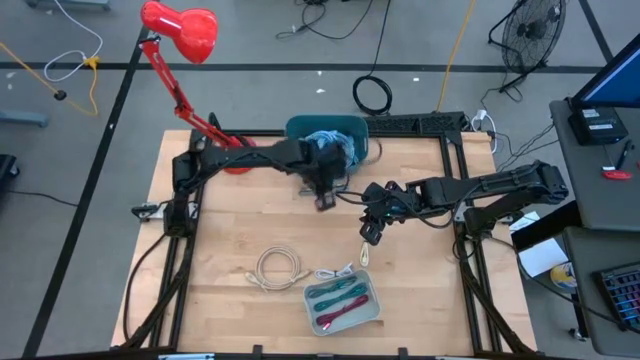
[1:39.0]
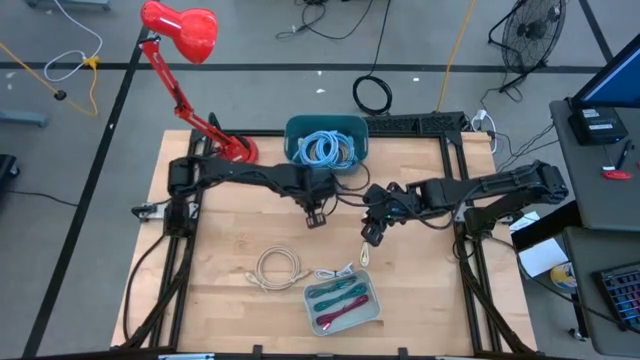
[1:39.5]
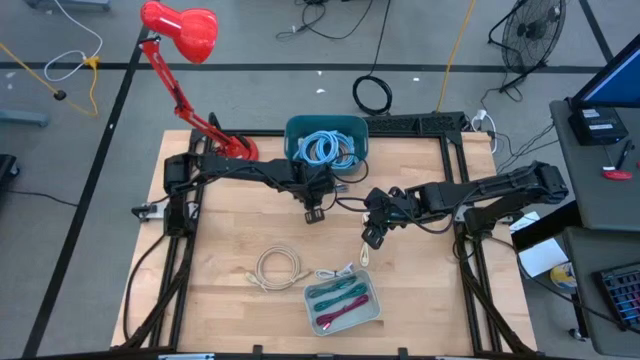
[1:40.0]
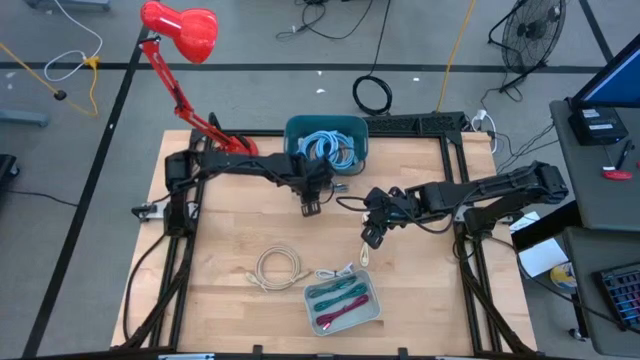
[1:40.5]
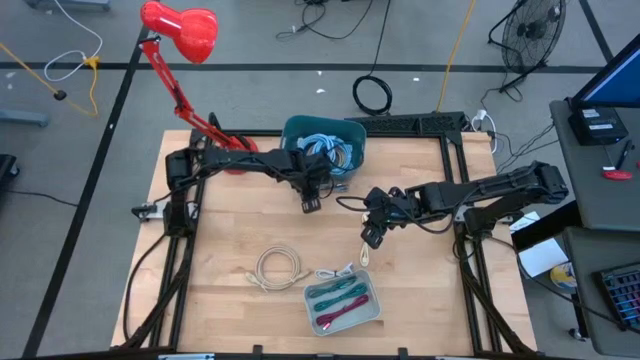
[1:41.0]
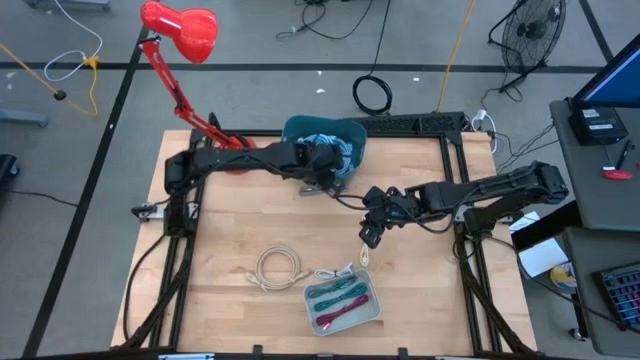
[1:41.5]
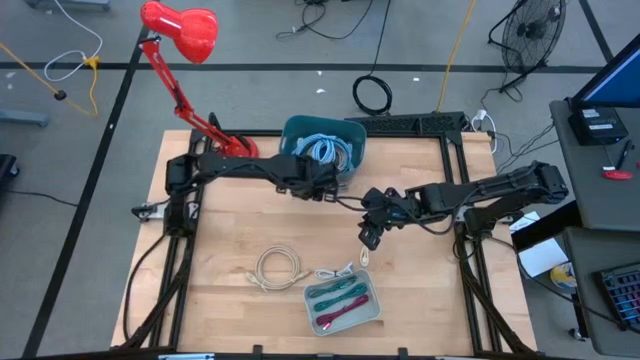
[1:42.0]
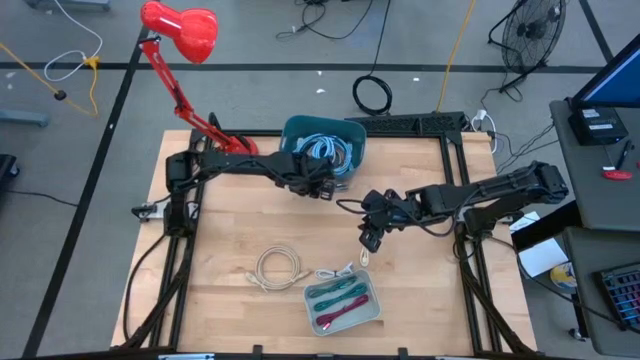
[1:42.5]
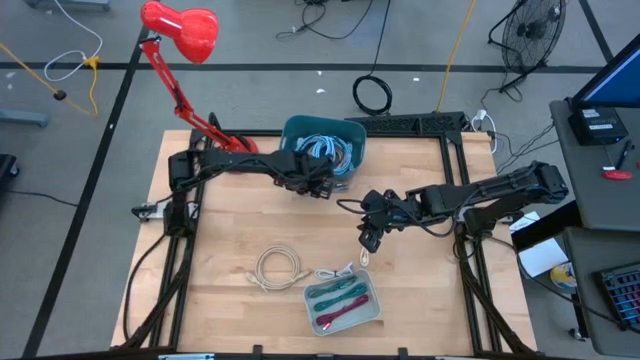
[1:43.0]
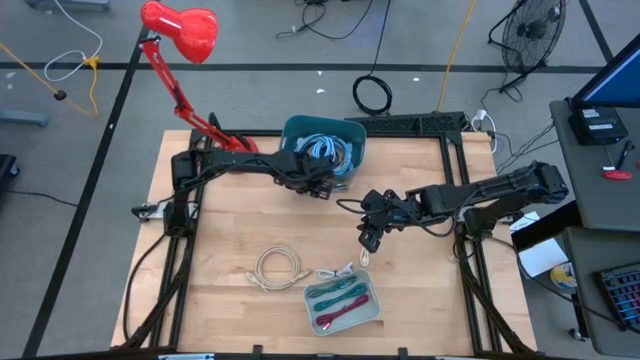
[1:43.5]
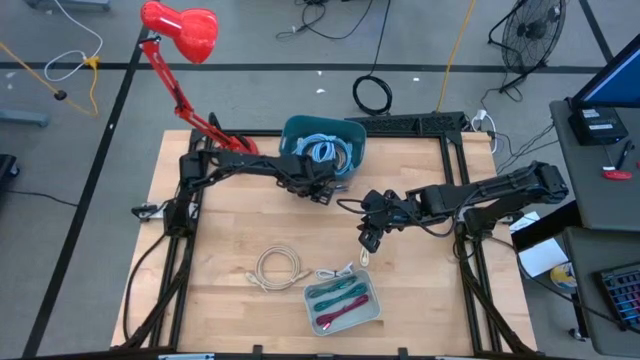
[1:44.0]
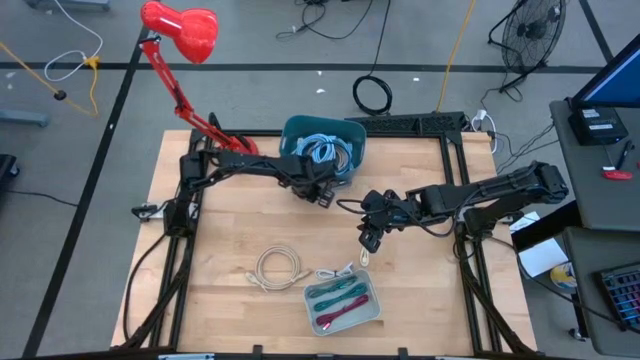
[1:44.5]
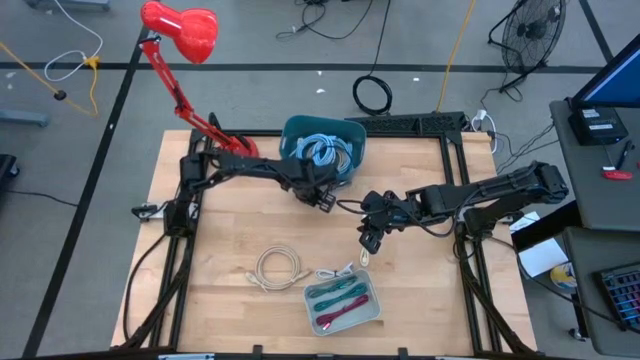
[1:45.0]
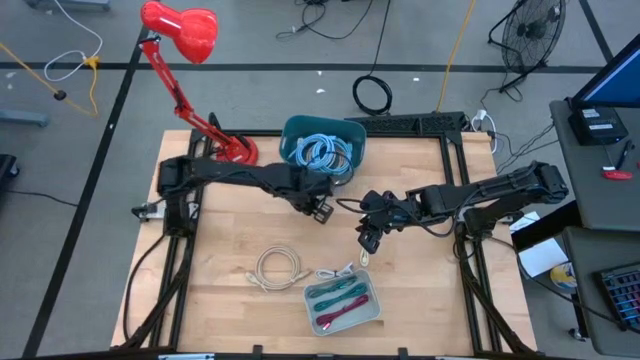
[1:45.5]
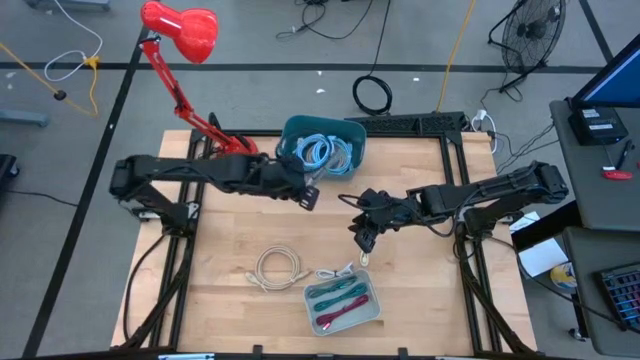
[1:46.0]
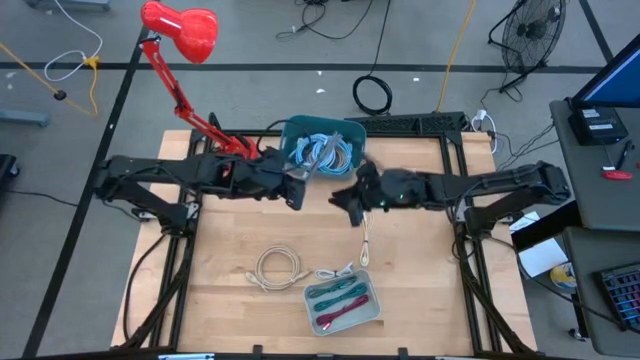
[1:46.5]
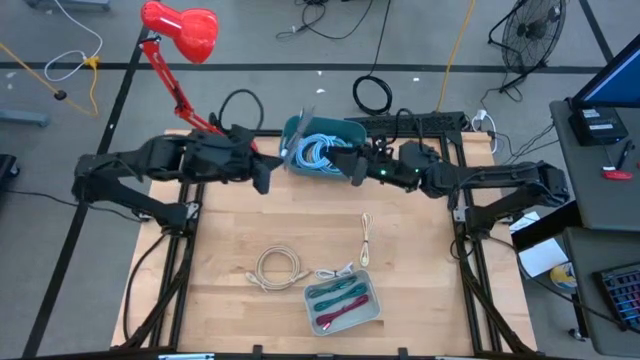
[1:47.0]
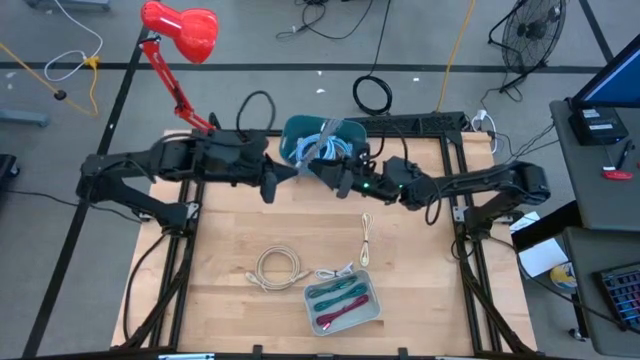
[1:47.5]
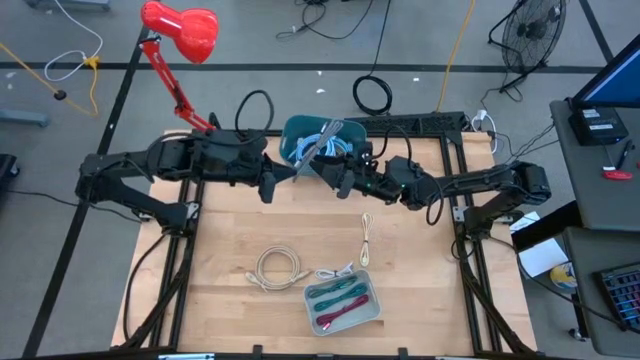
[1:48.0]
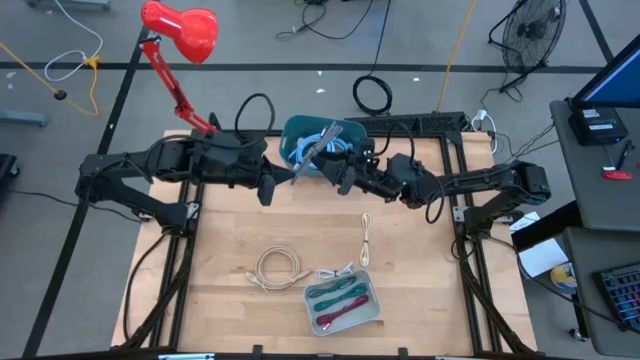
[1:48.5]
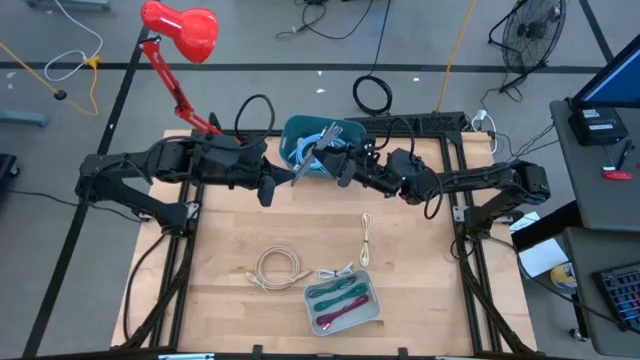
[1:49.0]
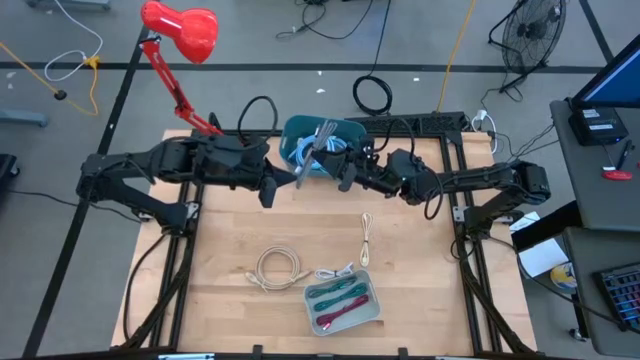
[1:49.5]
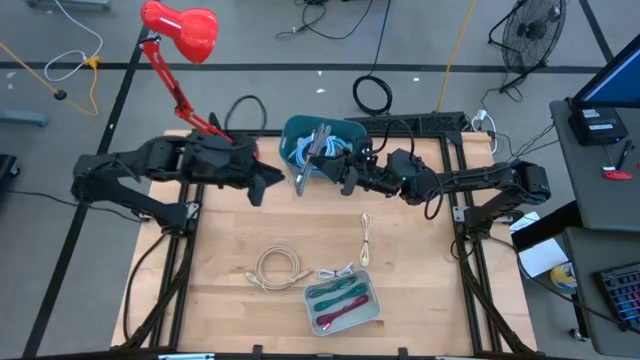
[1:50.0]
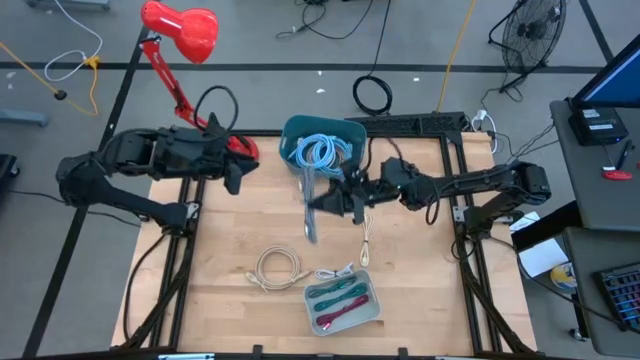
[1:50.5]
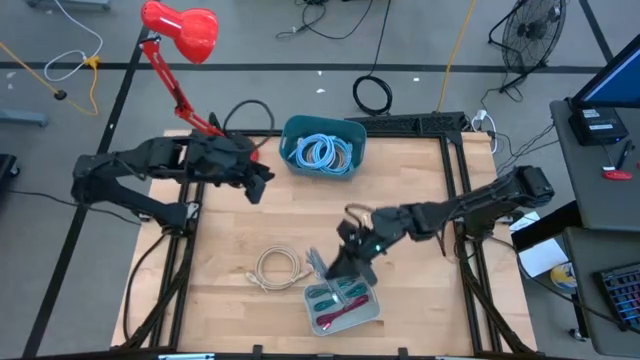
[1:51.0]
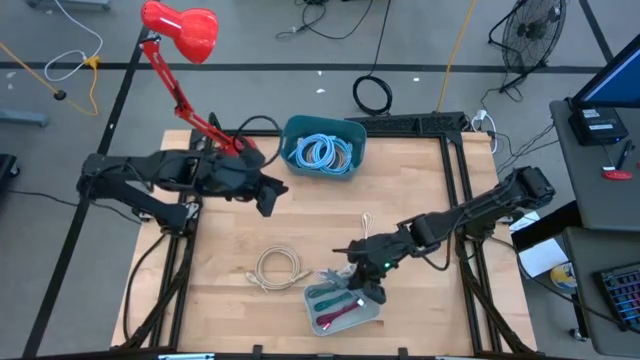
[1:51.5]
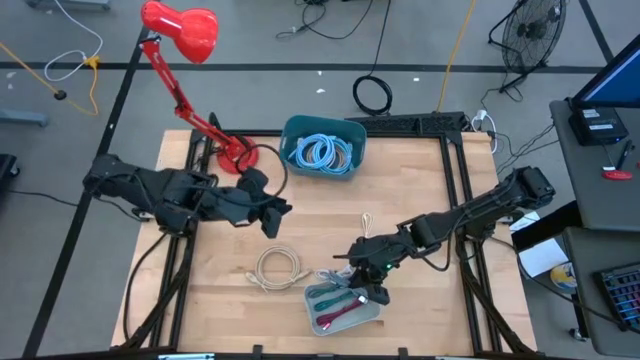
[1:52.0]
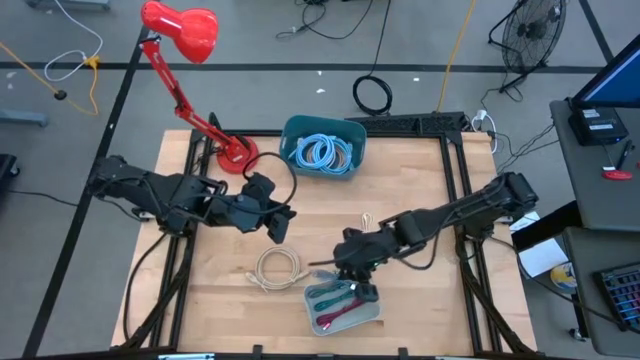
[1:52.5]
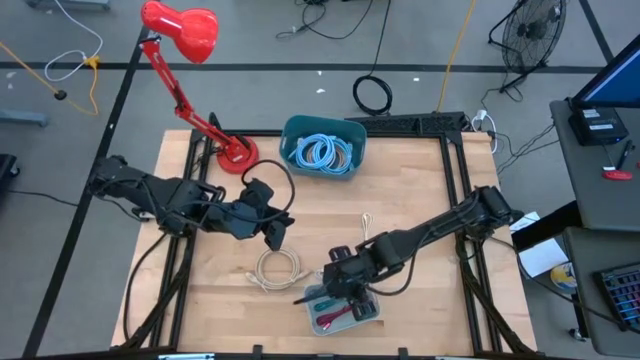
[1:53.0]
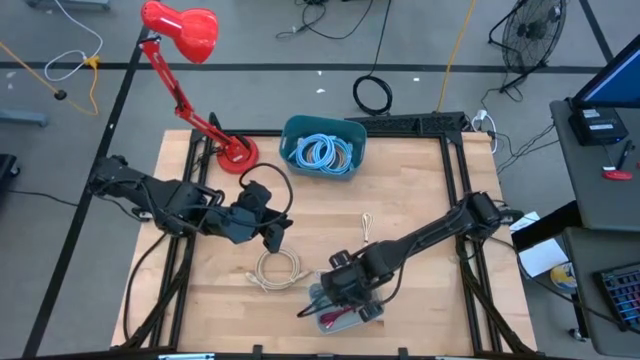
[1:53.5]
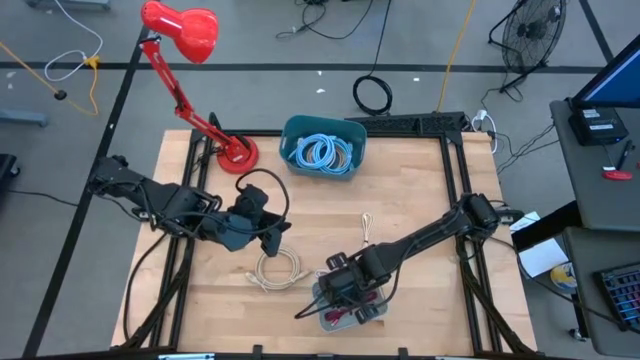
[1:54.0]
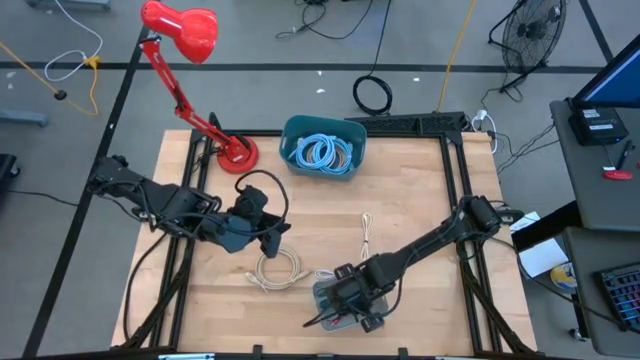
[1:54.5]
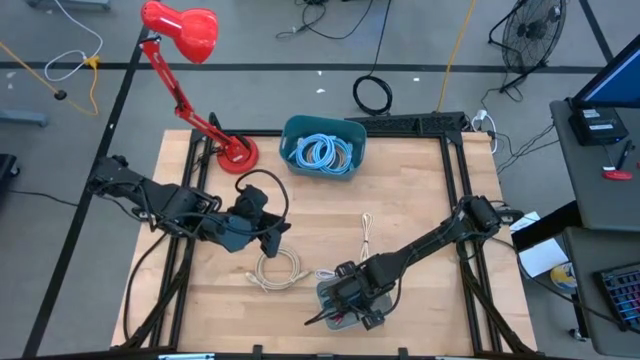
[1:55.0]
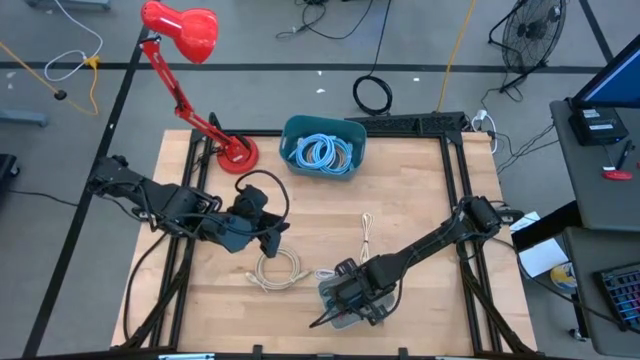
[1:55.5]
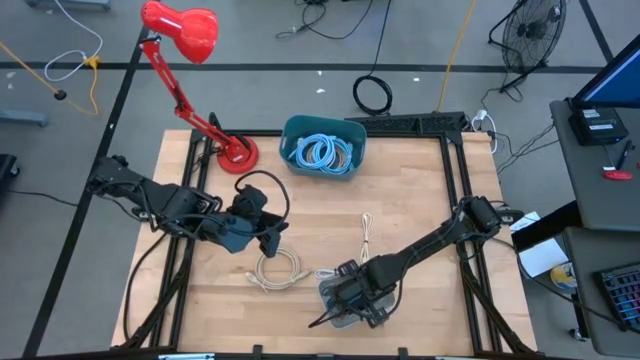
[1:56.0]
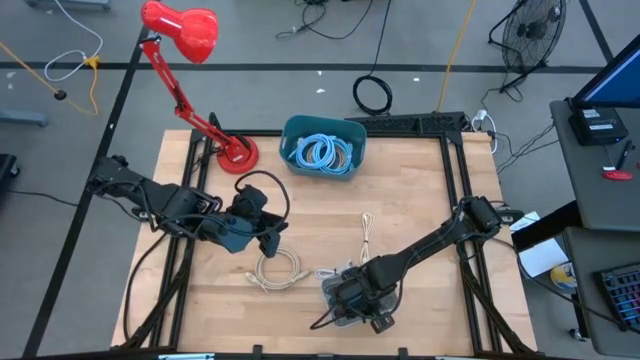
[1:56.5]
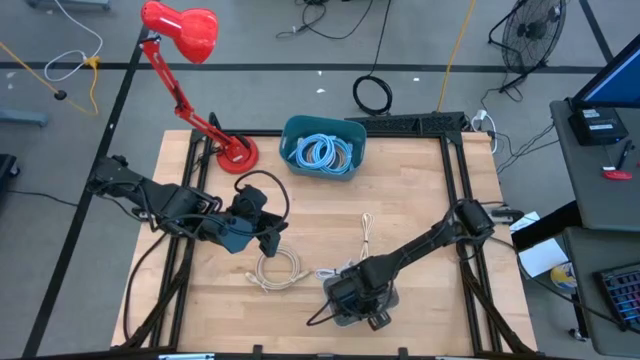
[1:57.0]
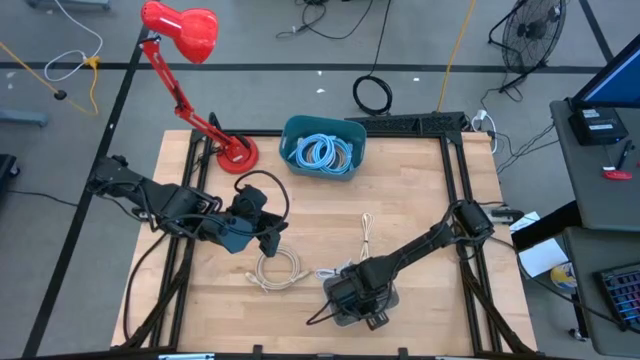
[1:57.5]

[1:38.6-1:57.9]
Task: Pick & Place USB Port
Put the black white charger cable into the gray bin

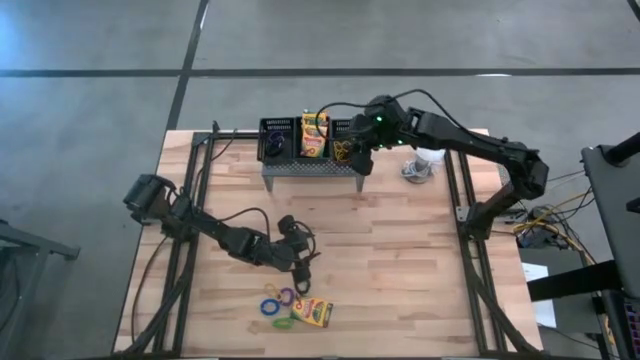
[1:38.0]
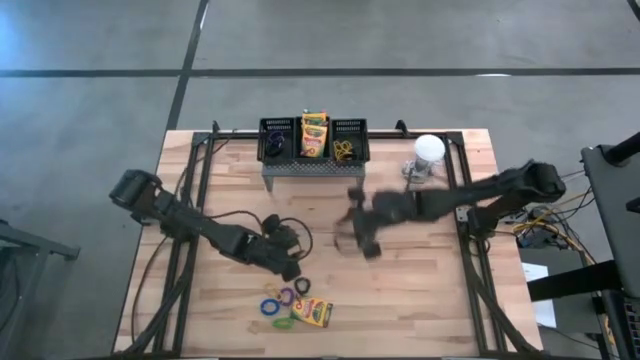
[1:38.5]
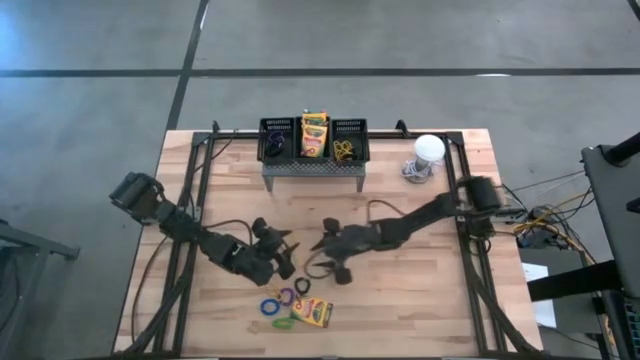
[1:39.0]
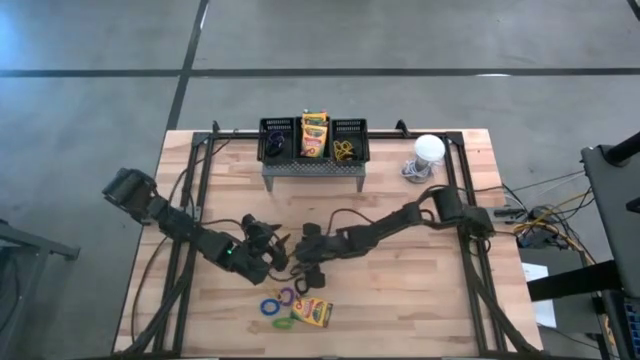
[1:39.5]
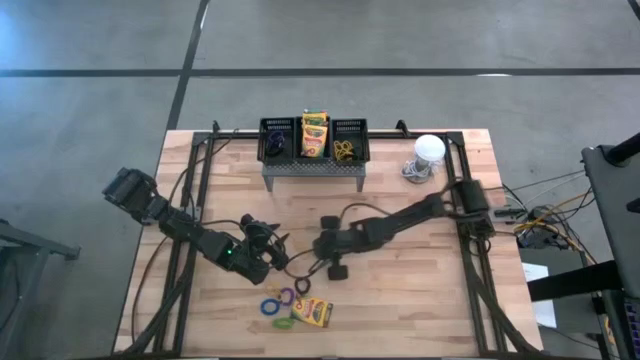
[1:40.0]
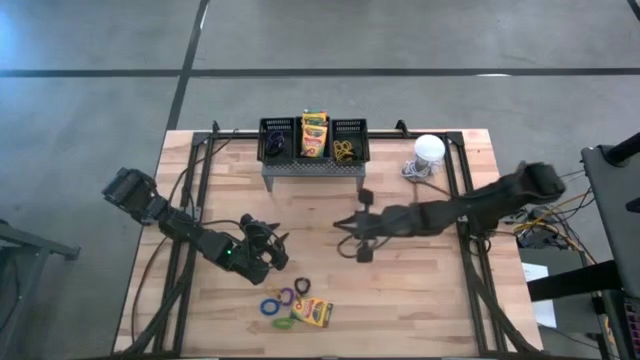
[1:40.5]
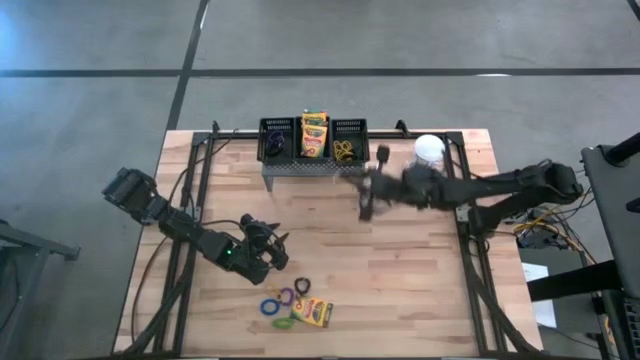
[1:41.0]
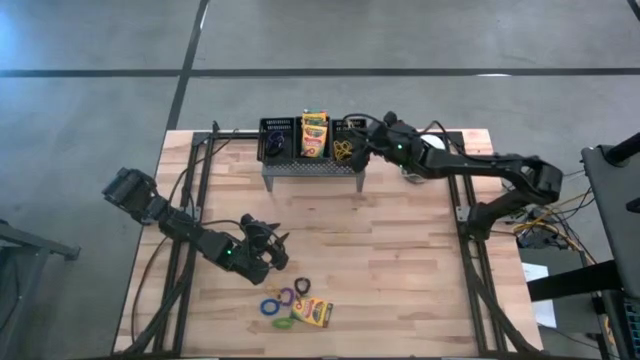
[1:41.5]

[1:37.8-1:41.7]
Task: Pick & Place Office Desk Supplies
Put the yellow rubber band into the right black basket on the shelf
